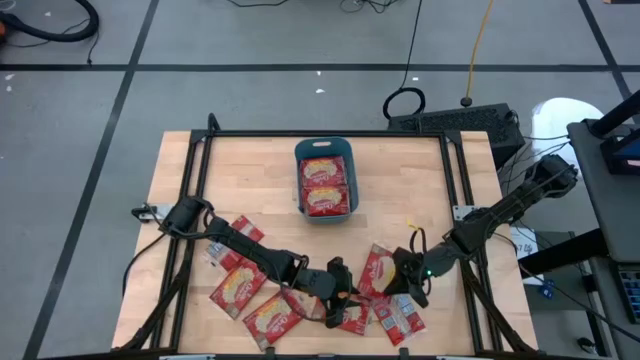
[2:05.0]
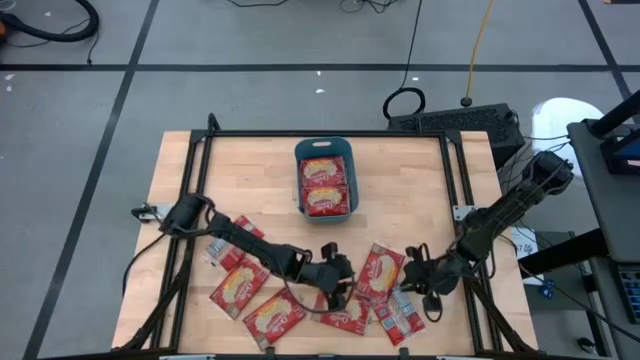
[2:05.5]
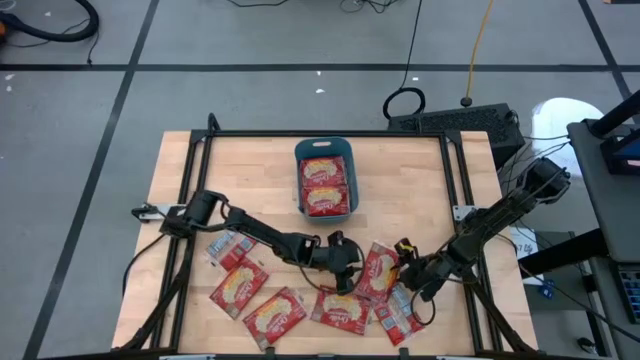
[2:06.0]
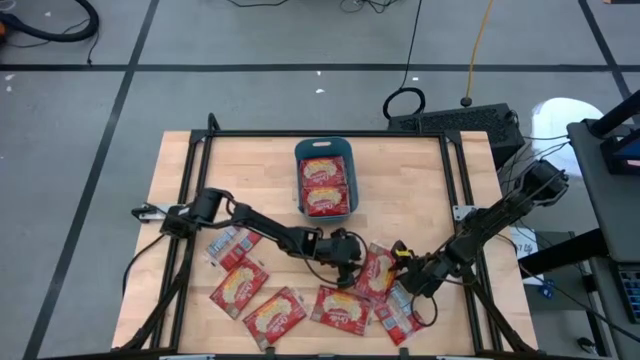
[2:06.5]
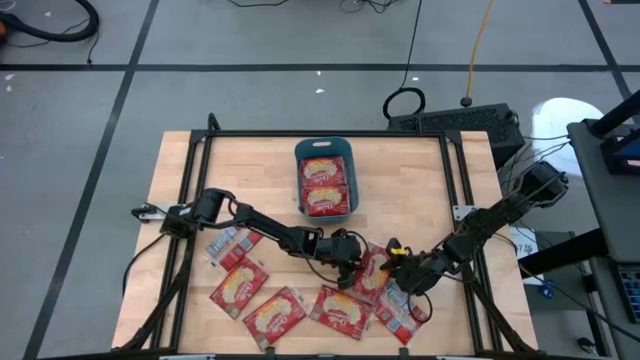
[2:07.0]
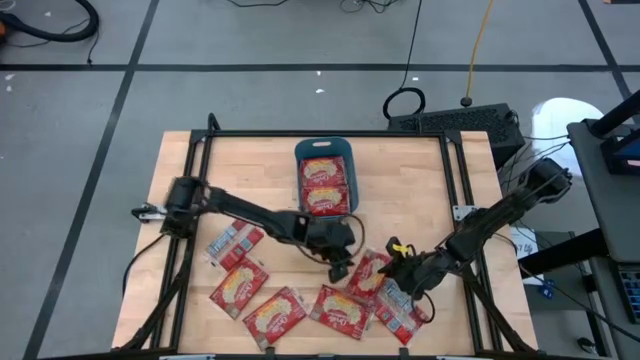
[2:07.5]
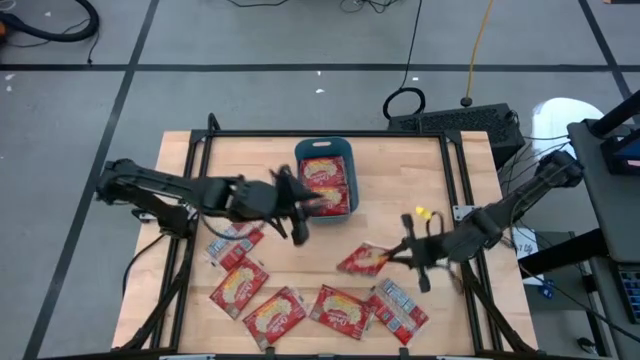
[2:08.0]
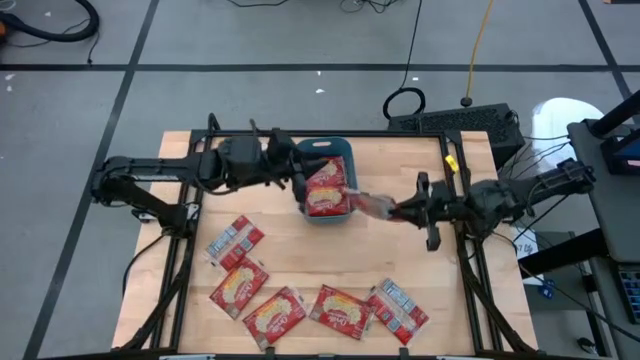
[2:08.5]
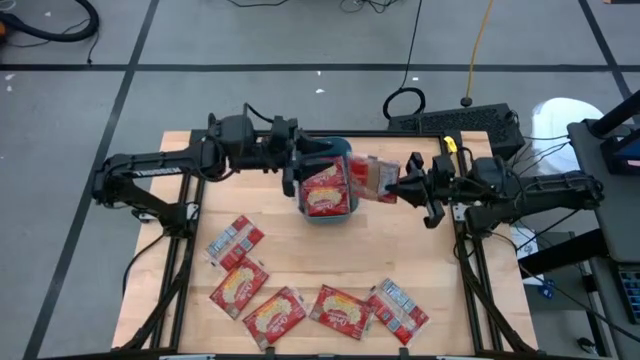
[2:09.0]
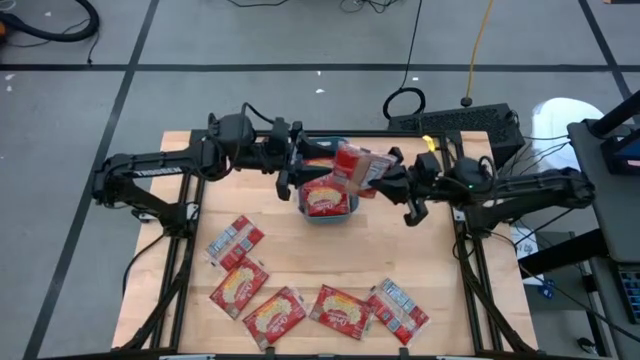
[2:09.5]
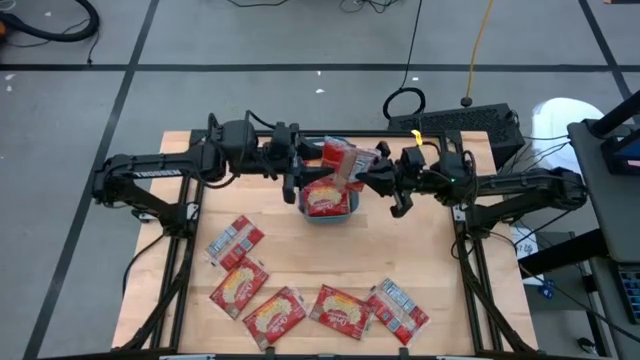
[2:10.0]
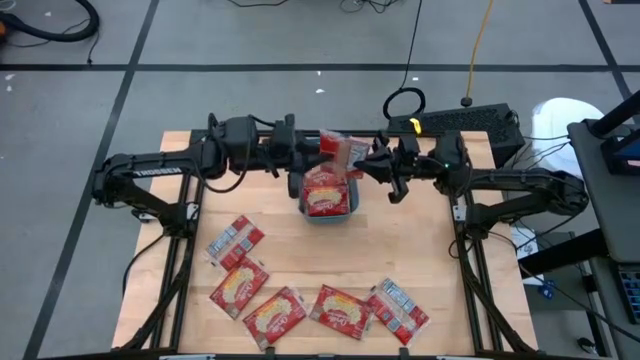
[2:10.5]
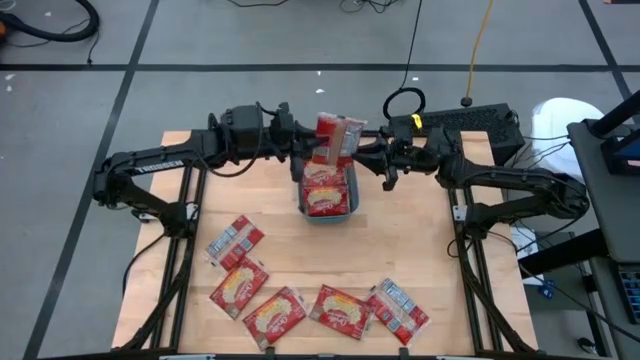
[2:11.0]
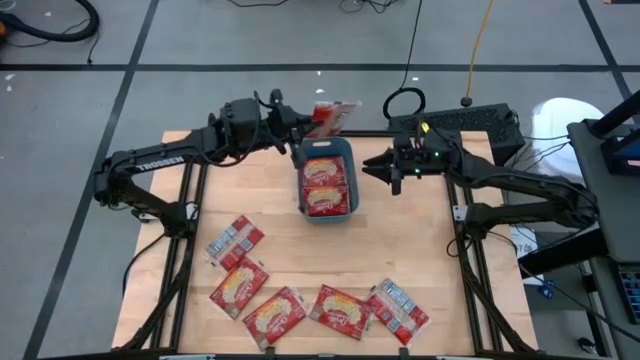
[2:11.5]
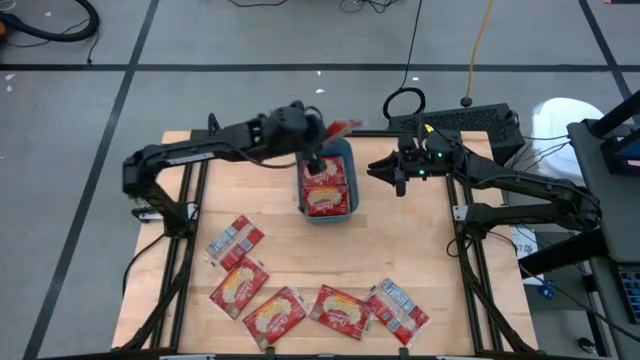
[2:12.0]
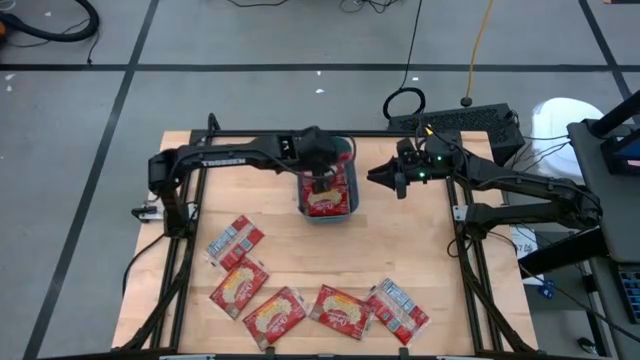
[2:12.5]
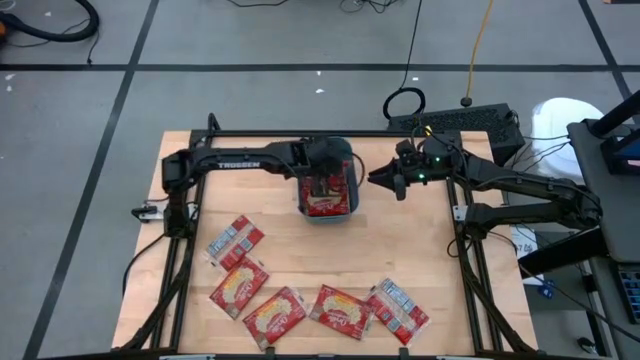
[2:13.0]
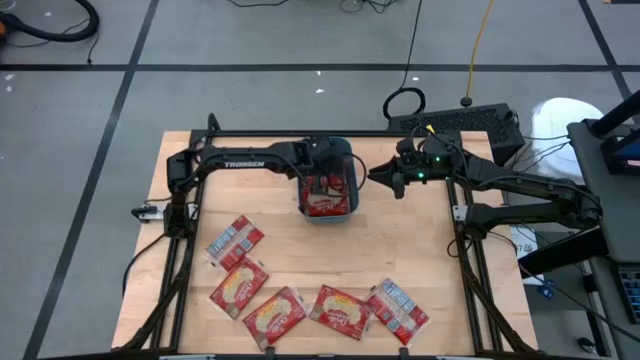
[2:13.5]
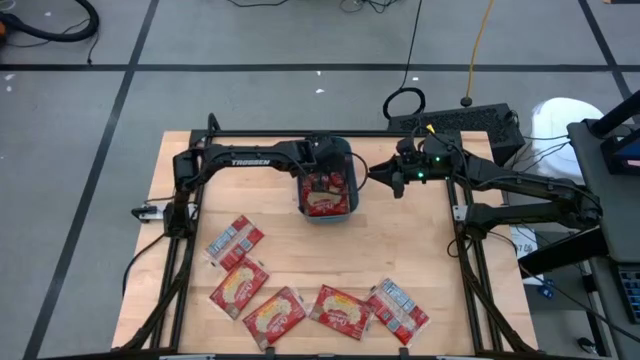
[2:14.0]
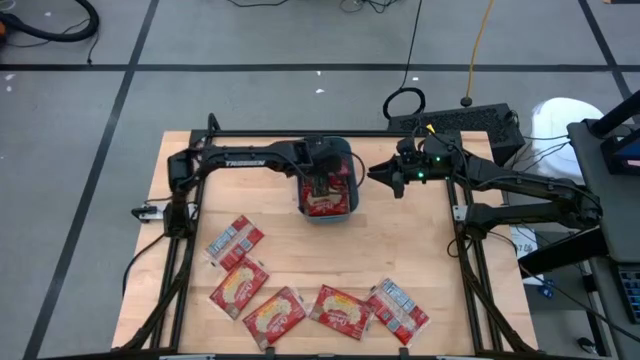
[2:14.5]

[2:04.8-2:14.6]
Task: Sort popcorn bags into baskets
Put the red popcorn bag into the blue bin

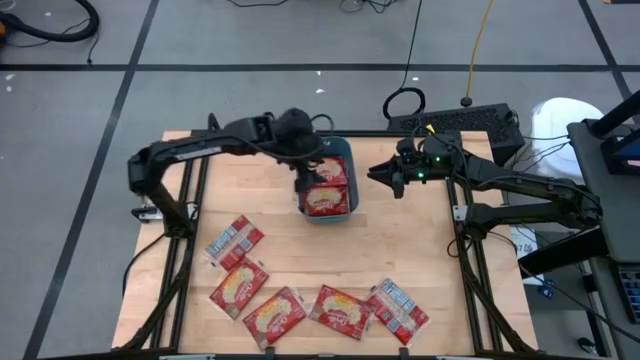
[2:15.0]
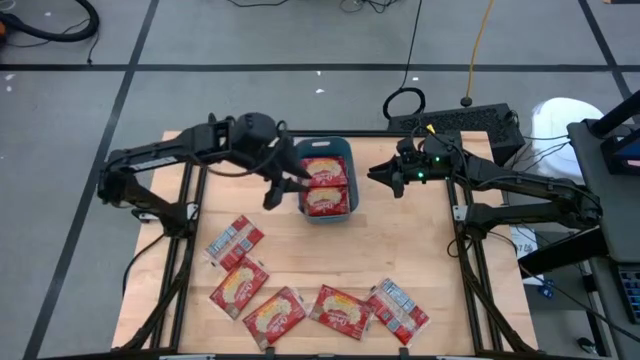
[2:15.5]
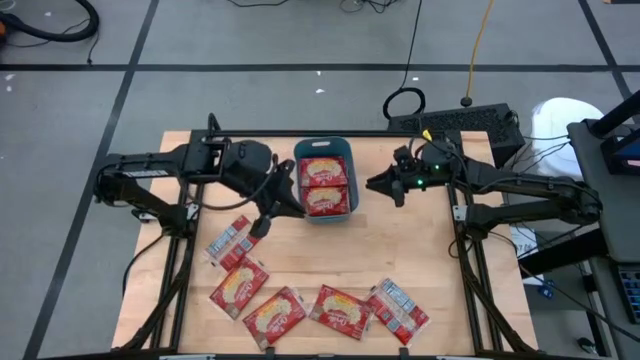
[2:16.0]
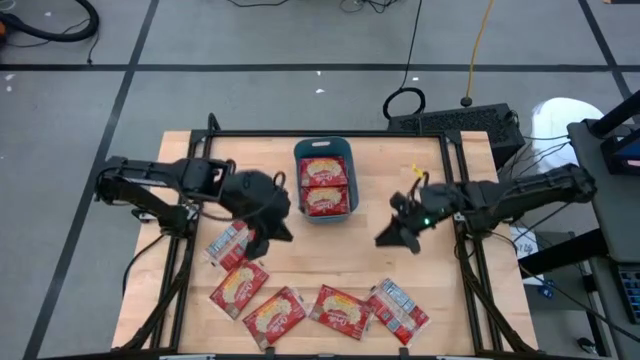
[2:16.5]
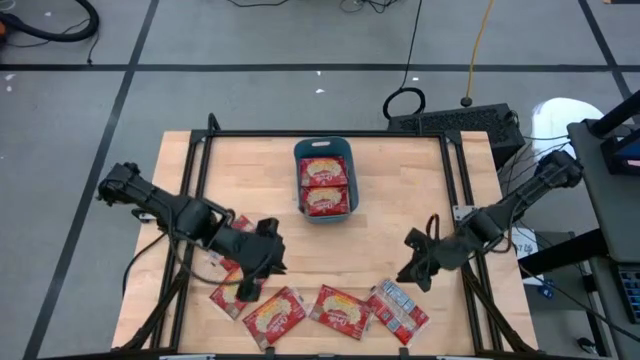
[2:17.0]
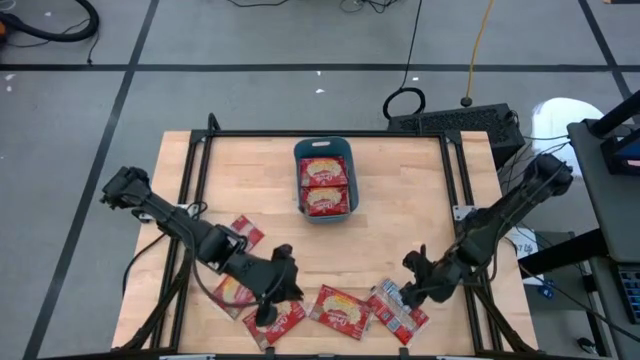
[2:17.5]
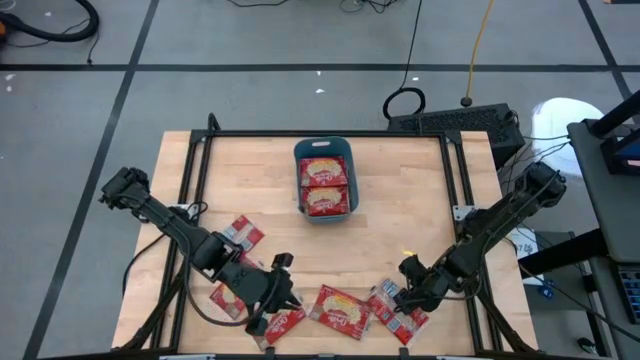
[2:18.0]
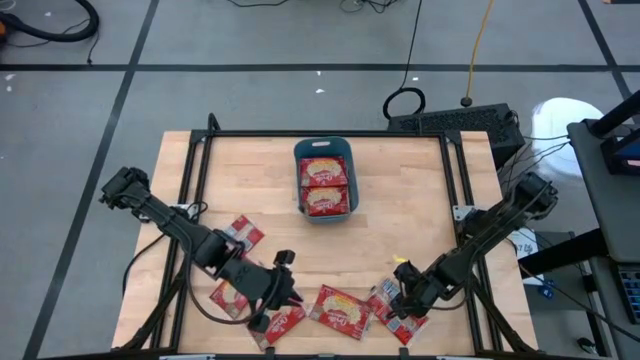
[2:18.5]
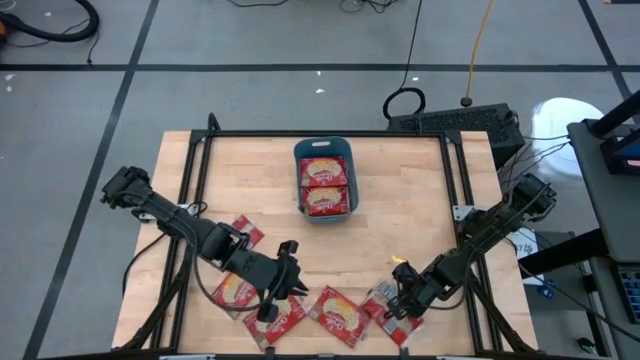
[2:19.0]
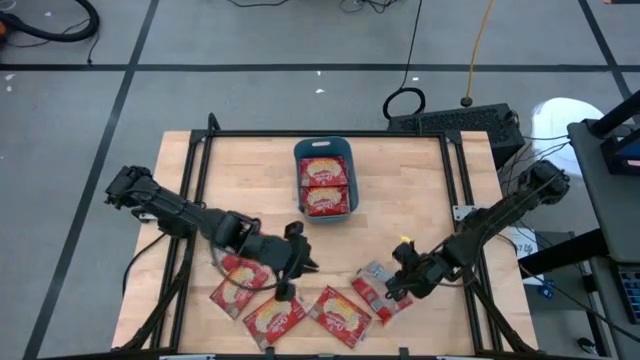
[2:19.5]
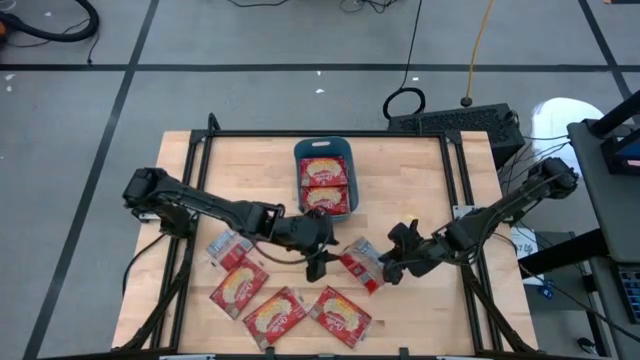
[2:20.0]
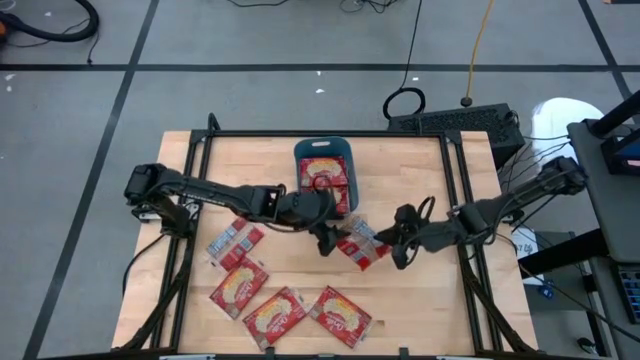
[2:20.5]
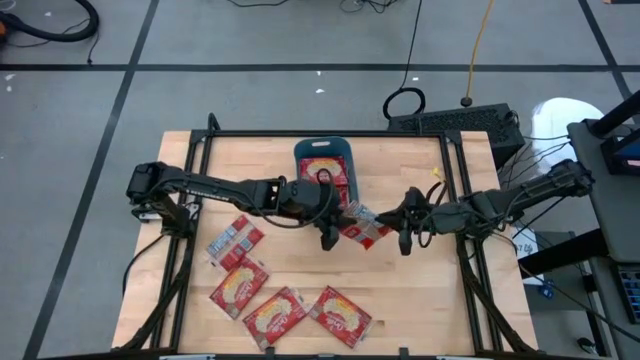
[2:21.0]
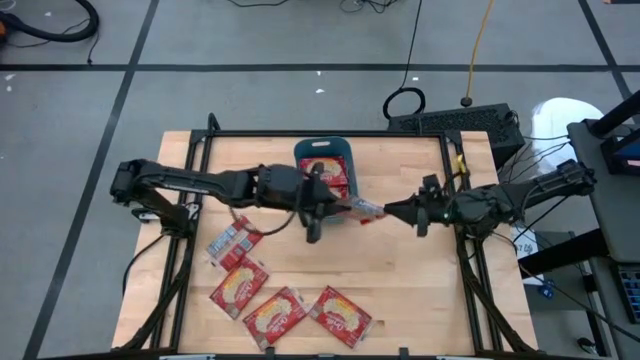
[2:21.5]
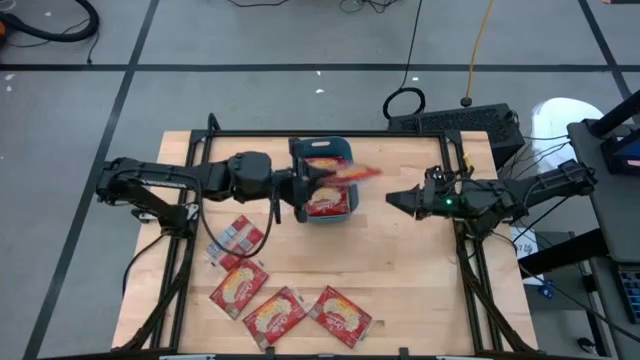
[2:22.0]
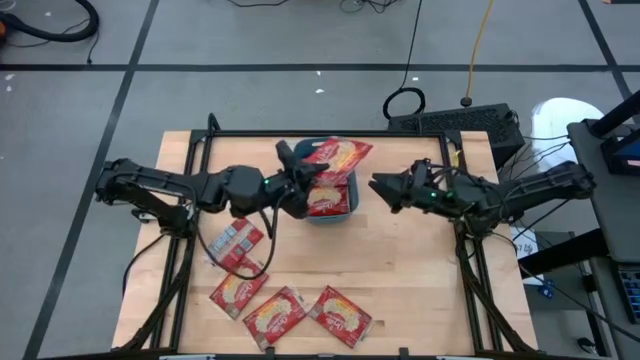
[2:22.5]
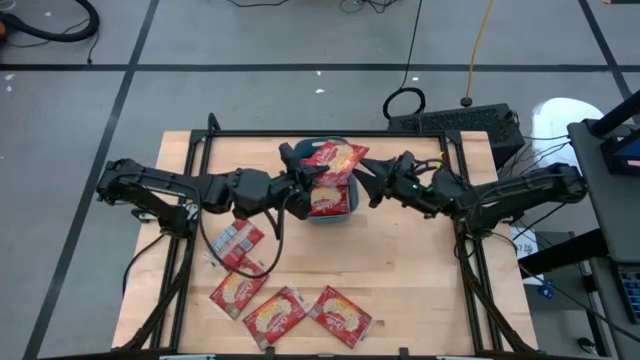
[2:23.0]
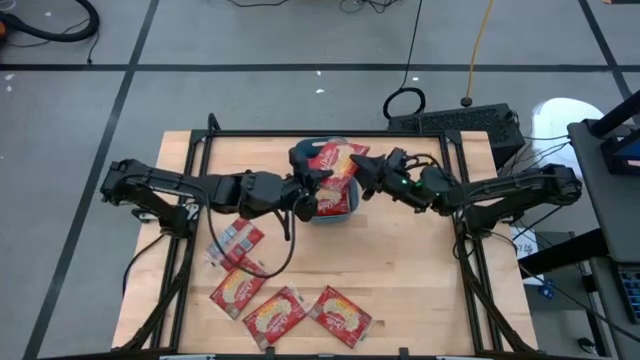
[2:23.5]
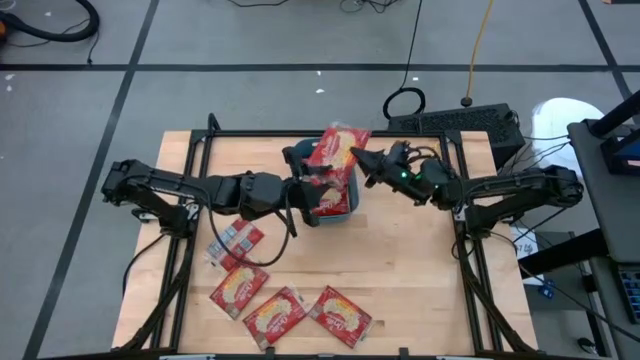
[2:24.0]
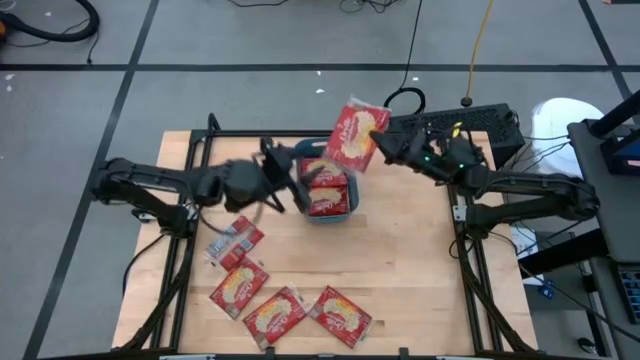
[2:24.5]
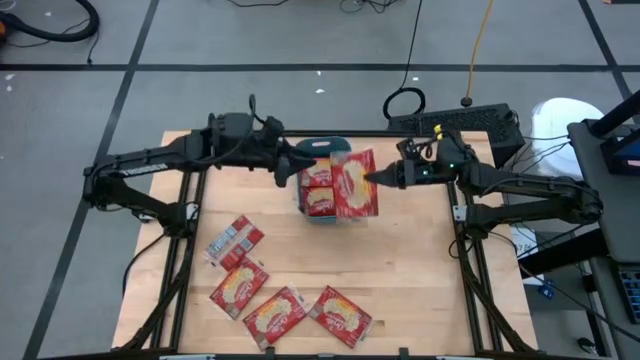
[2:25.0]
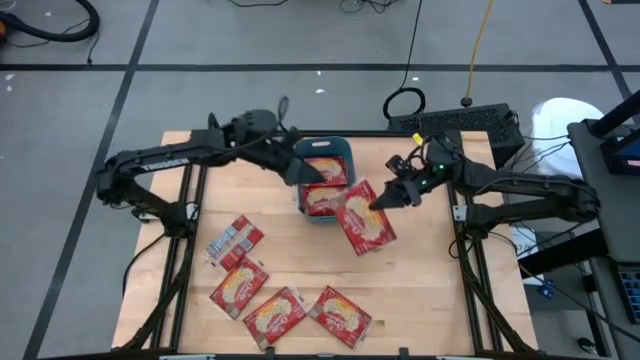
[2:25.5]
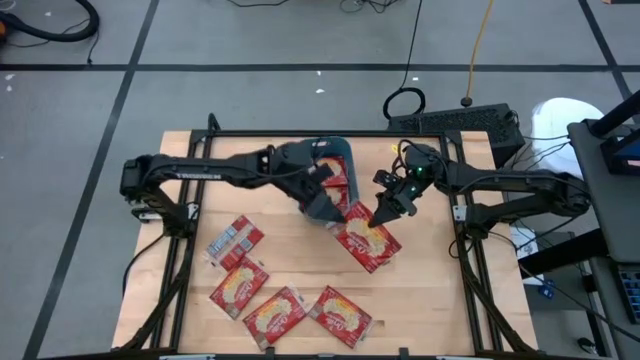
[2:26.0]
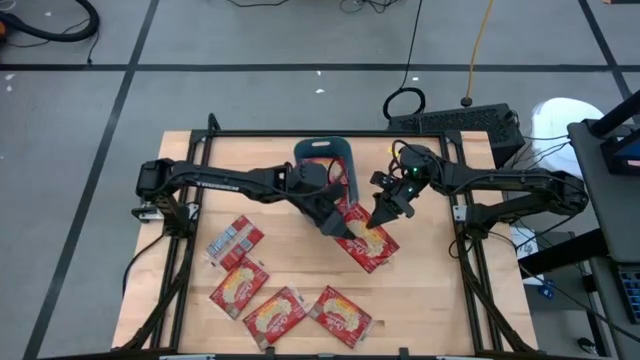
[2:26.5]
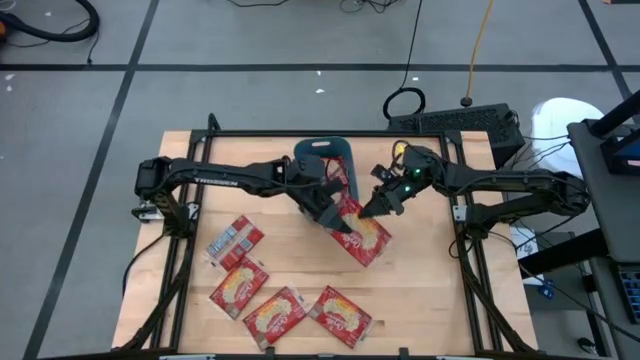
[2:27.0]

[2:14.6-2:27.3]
Put the red popcorn bag into the blue bin
